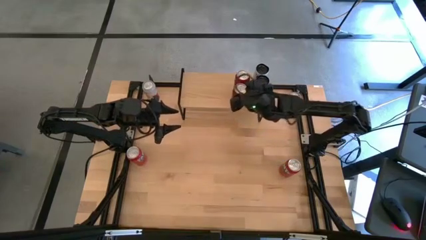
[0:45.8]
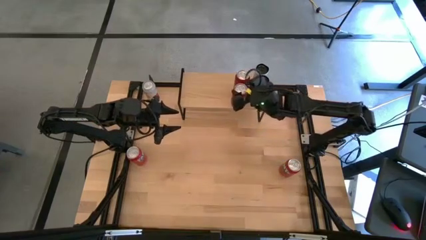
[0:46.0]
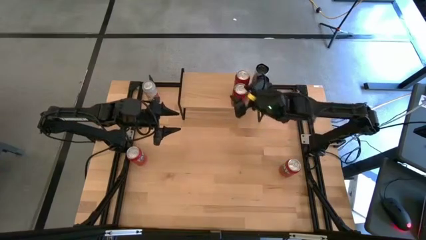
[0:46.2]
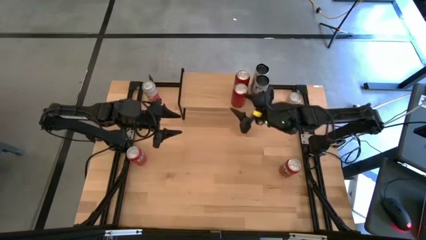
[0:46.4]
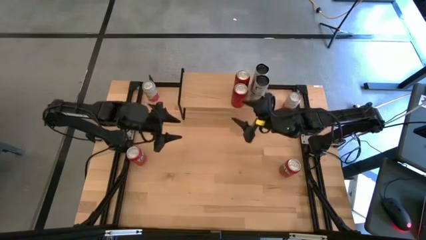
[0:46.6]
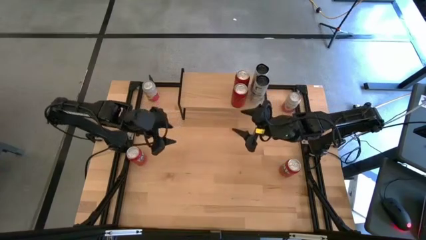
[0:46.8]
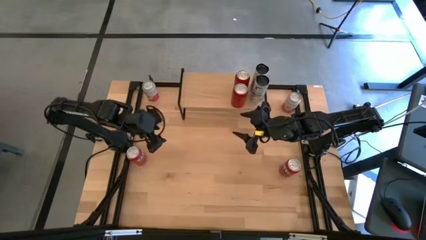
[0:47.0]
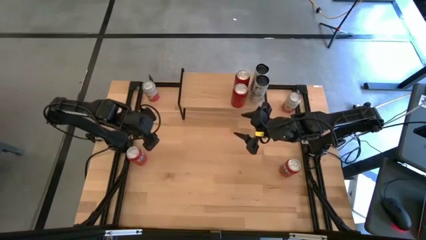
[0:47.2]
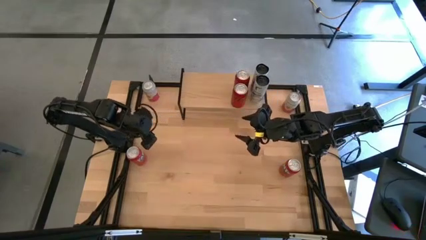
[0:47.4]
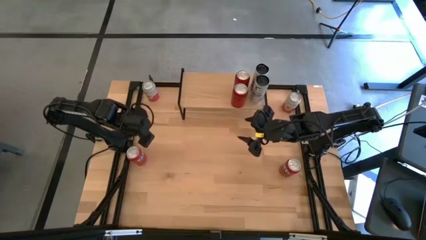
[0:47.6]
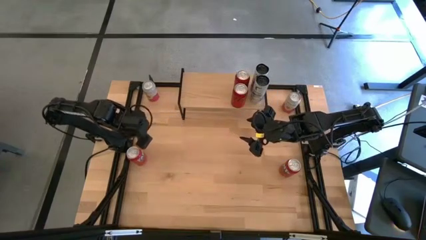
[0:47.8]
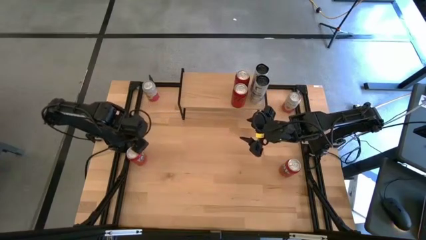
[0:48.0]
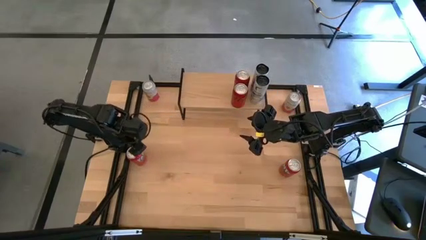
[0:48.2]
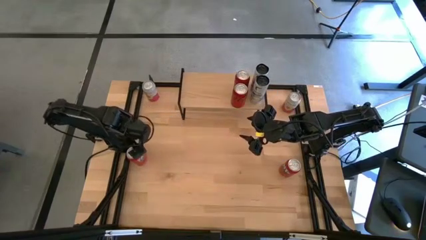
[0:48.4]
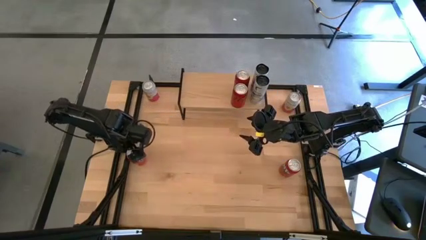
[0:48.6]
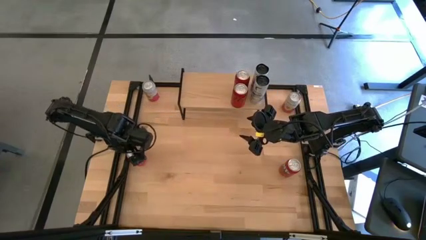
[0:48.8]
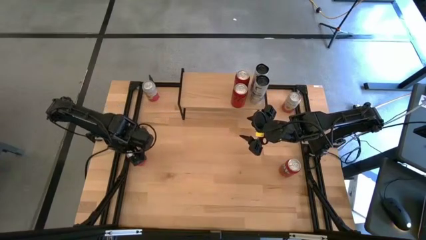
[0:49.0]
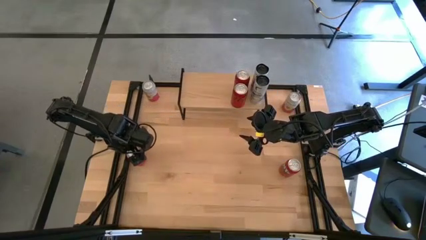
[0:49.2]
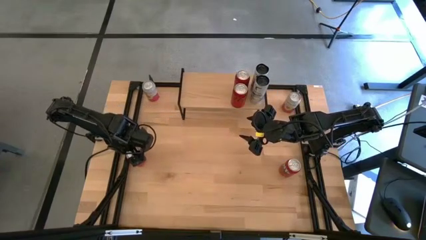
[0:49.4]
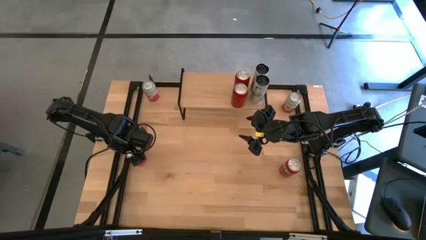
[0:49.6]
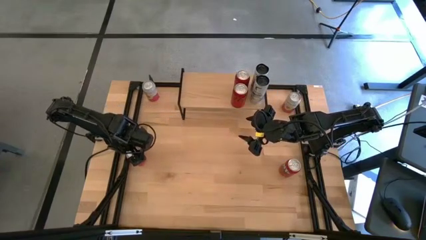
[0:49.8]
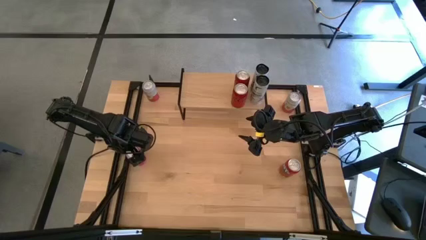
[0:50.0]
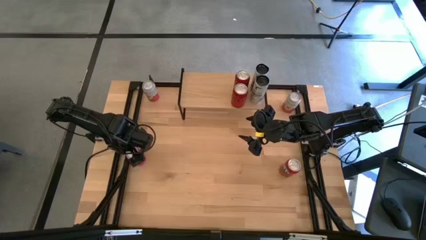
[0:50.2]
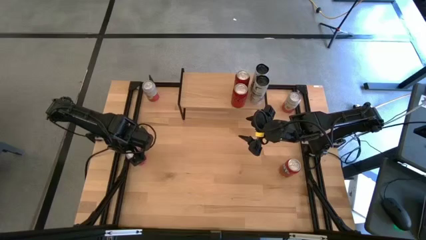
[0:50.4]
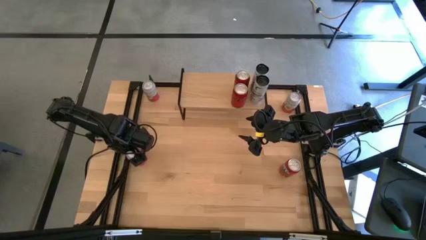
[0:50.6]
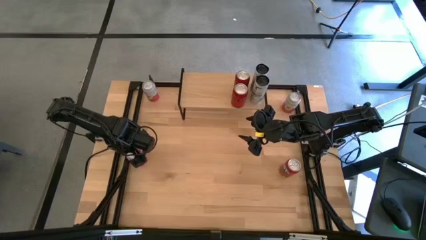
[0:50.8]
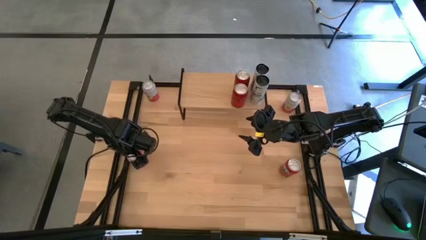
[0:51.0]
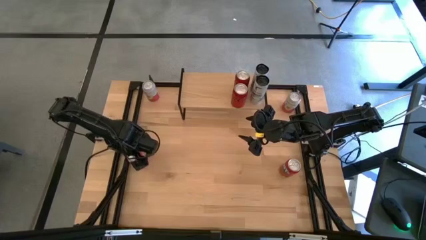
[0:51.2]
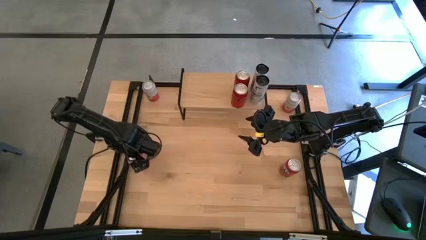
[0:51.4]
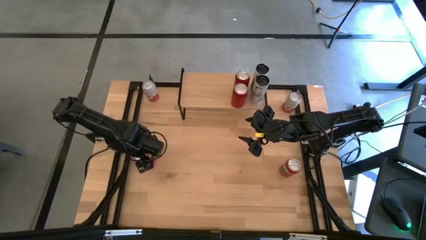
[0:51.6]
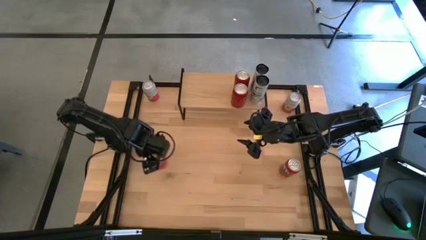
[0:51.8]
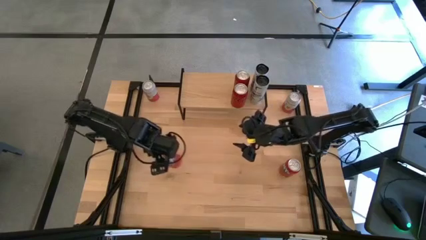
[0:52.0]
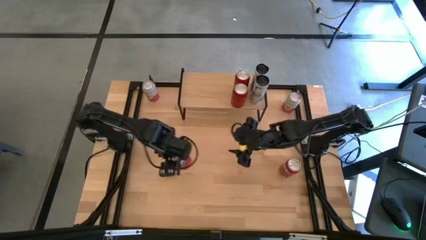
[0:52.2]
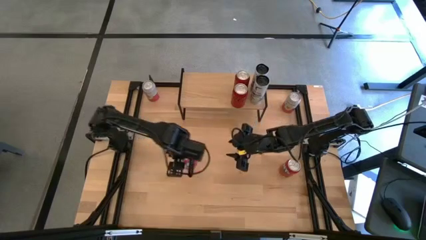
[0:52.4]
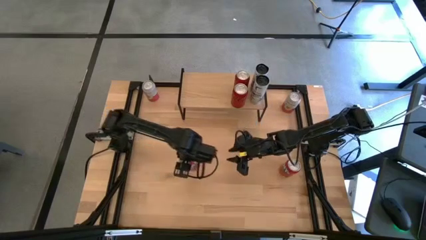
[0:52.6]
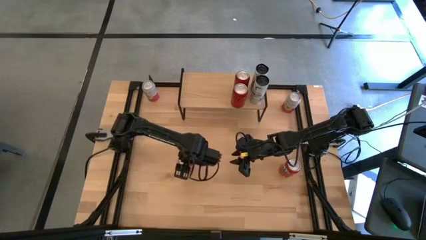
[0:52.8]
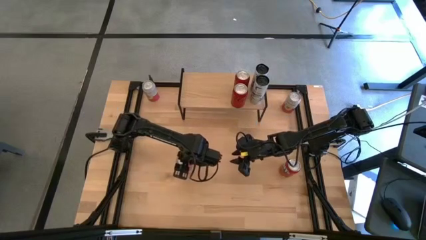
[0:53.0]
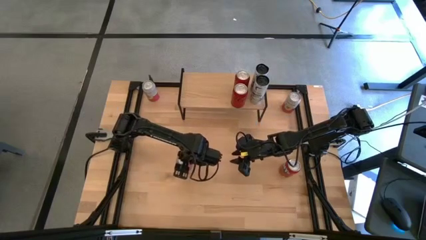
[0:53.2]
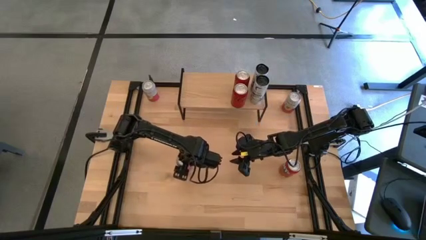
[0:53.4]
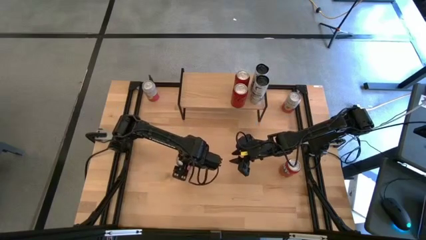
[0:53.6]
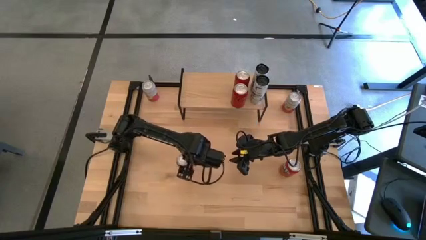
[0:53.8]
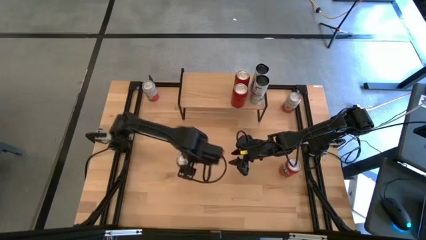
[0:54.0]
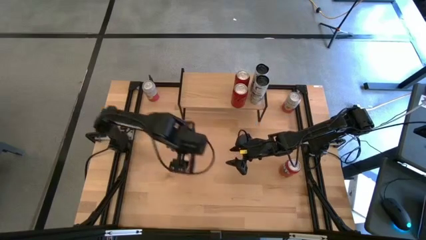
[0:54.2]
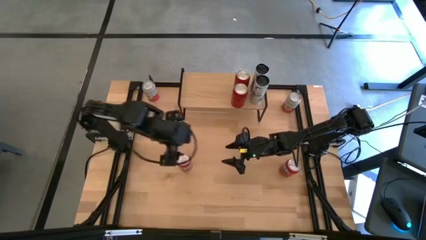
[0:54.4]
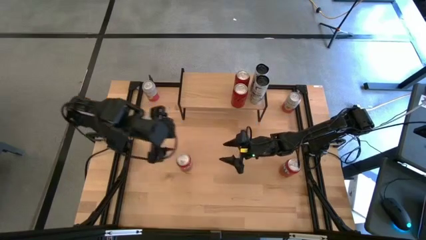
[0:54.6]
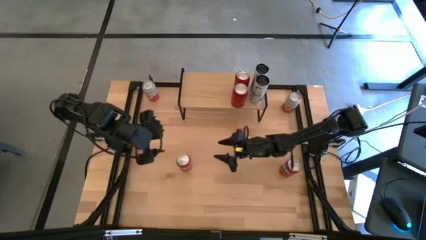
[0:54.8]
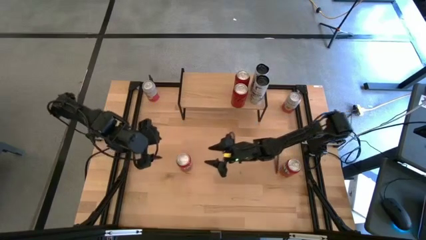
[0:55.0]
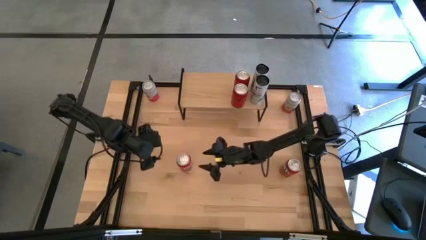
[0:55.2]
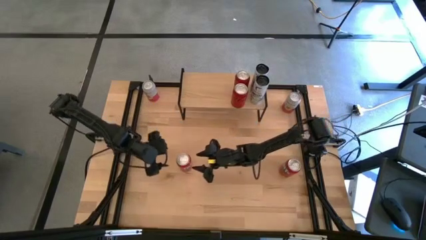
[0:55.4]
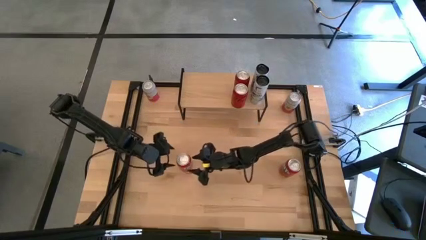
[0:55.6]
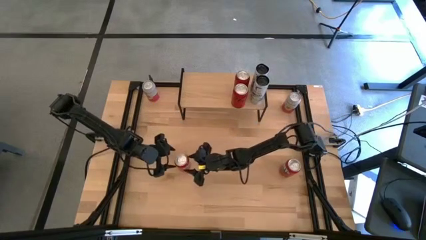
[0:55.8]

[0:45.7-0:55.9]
Task: Place canned beverage on shelf
Put the left red soda can on the shelf

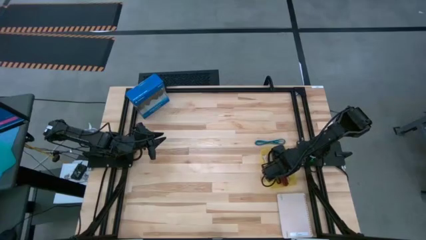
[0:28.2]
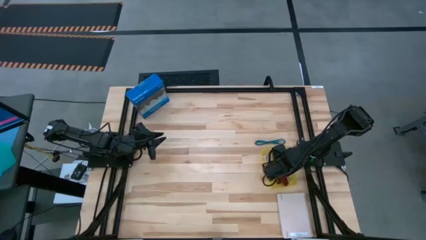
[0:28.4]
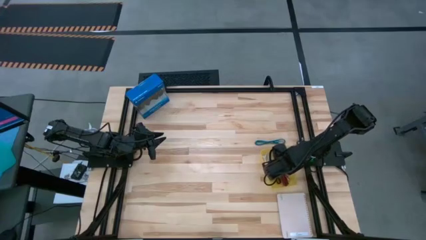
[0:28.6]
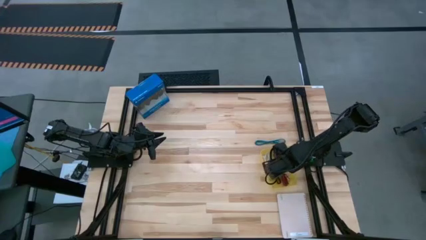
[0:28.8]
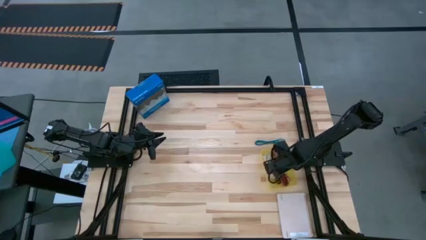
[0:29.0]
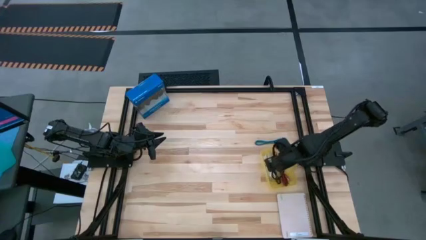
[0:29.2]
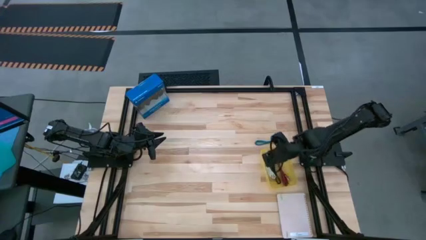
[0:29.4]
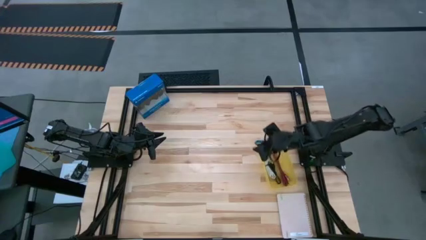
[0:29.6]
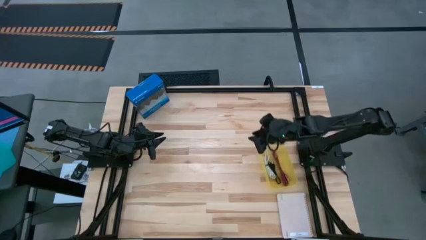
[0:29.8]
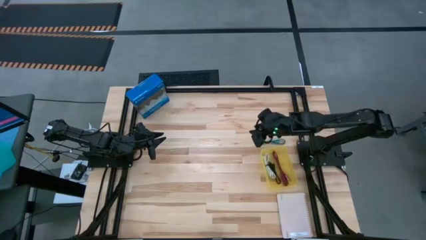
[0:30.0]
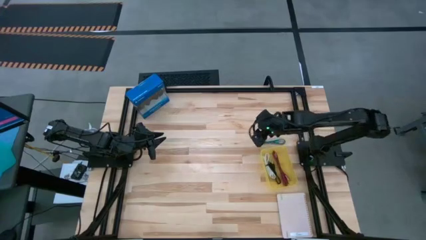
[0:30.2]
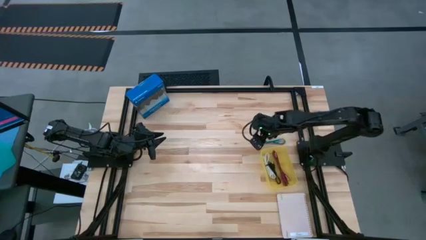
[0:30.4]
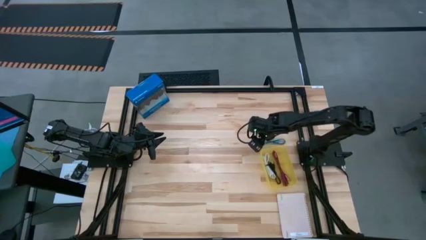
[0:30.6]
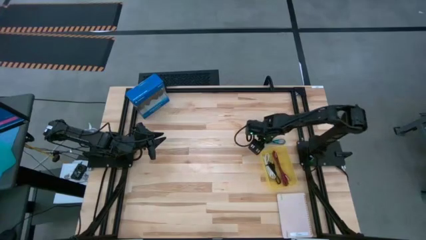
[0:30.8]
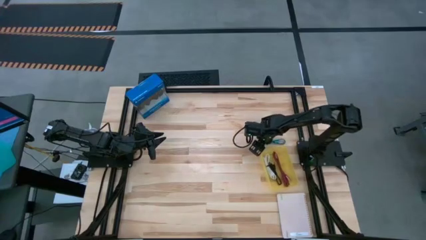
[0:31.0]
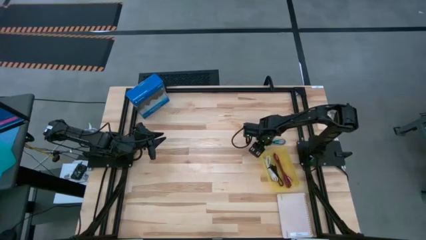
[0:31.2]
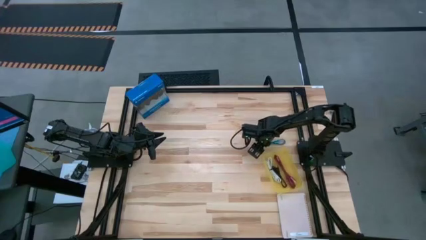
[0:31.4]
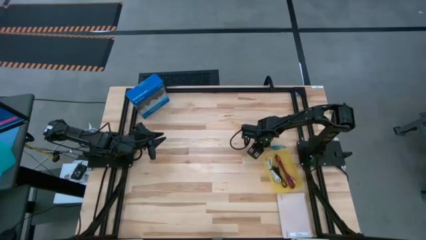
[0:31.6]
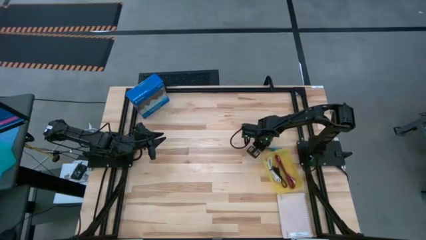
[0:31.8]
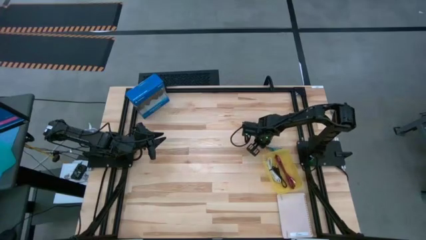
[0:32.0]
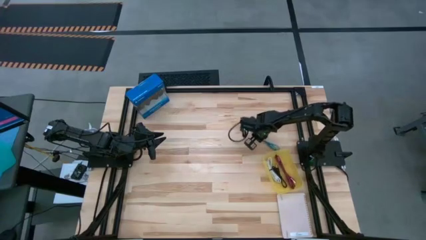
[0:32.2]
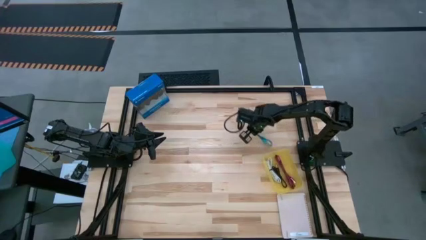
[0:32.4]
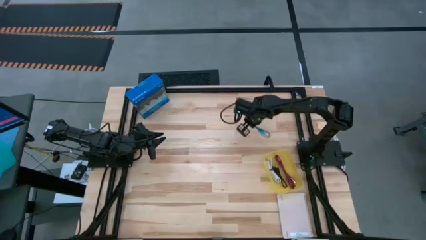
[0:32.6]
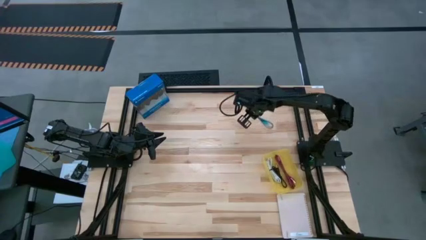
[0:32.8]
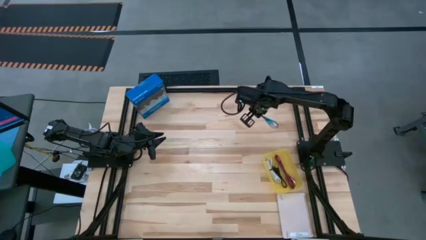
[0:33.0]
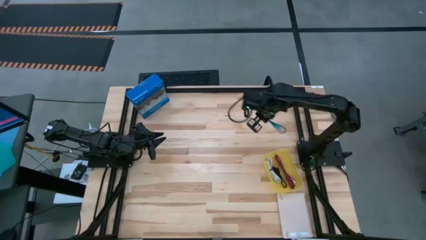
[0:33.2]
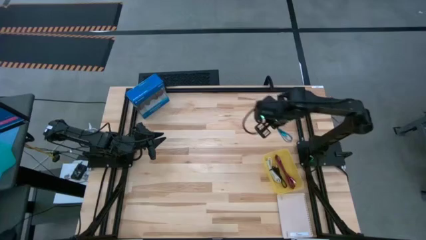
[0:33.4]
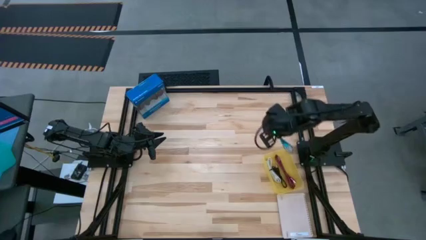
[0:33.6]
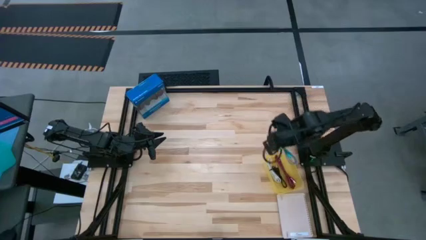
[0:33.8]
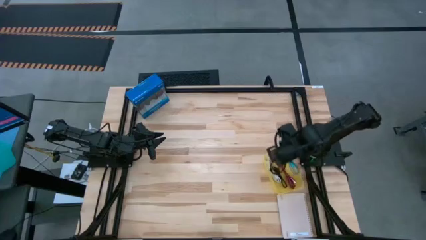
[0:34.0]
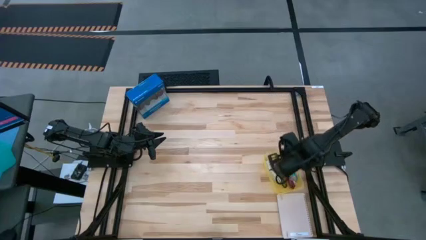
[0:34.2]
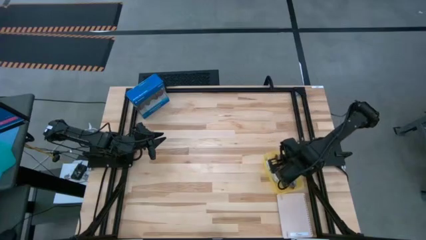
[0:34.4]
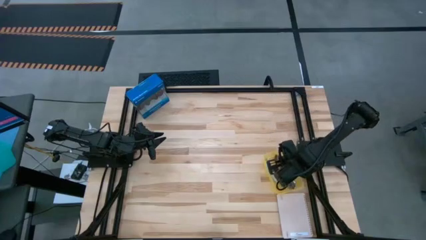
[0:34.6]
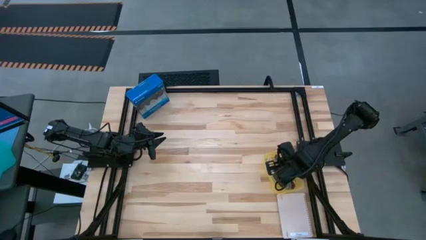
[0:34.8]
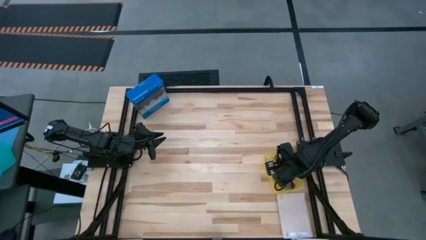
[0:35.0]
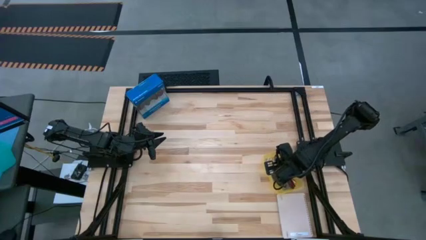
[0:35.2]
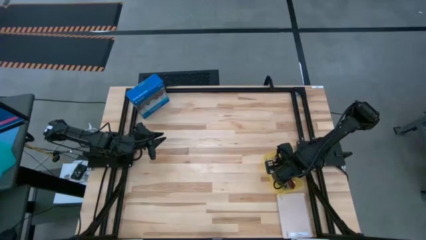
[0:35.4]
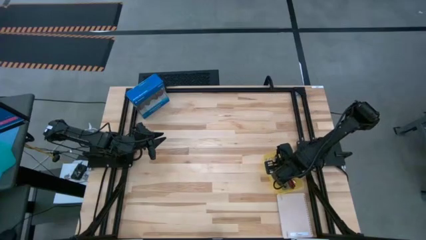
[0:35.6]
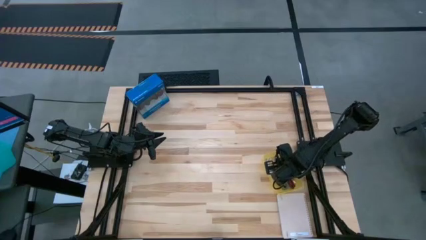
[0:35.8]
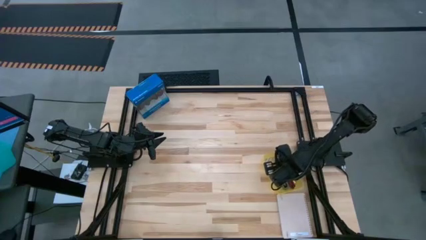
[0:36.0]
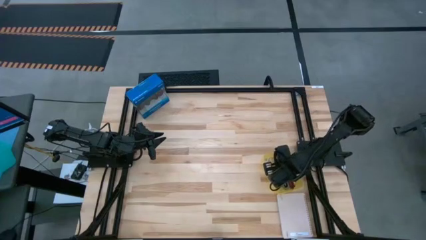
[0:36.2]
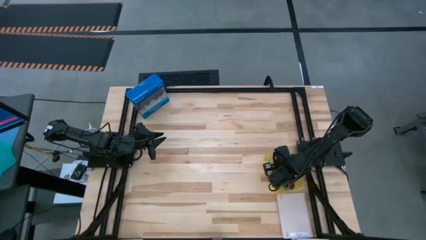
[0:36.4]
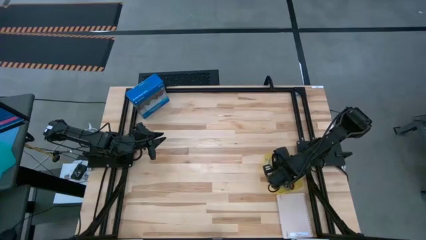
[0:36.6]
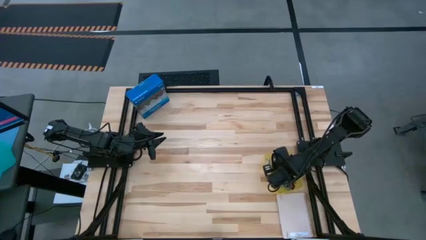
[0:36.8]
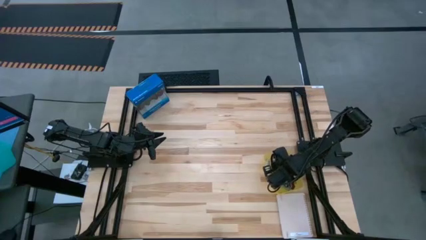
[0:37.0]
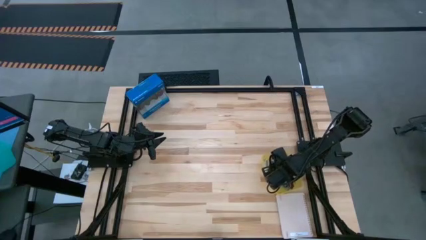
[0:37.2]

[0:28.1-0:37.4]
Task: Pick and place USB-C Cables
Put the blue charger cable into the yellow bin
